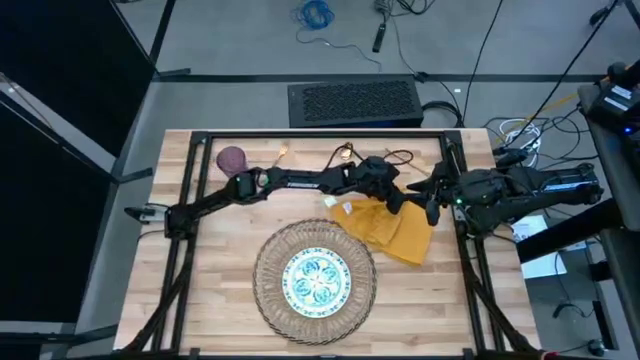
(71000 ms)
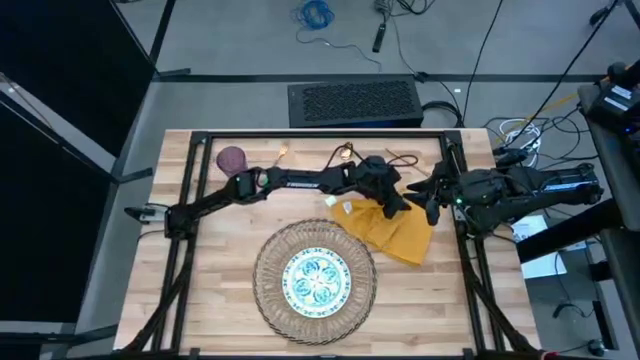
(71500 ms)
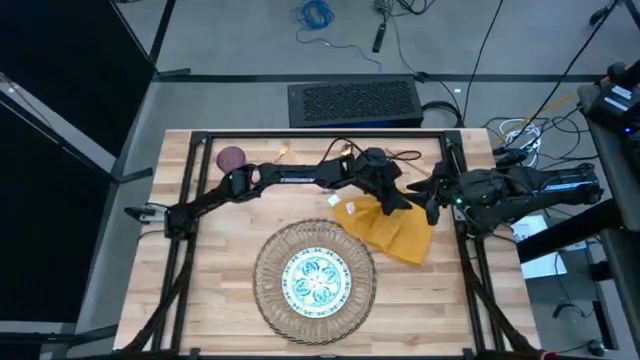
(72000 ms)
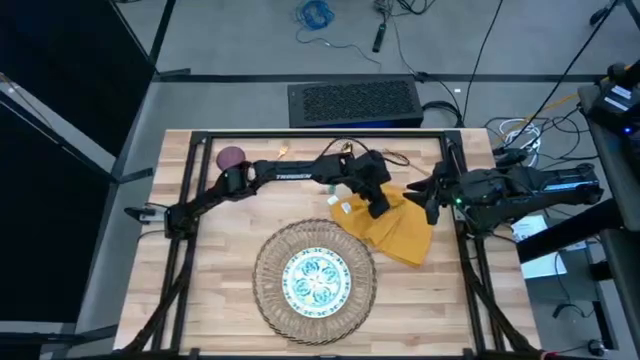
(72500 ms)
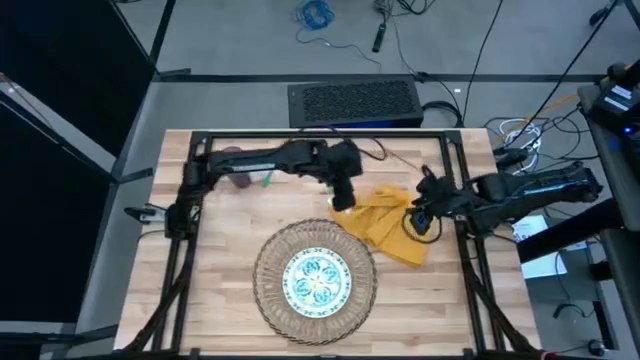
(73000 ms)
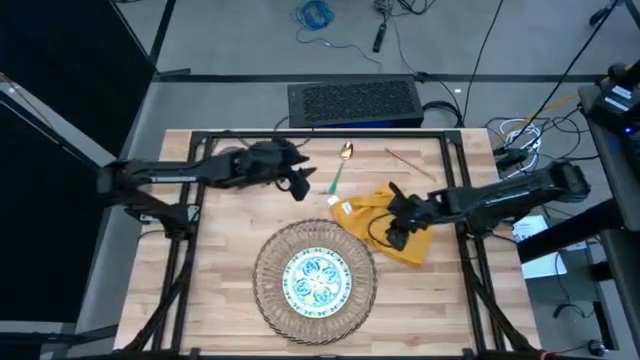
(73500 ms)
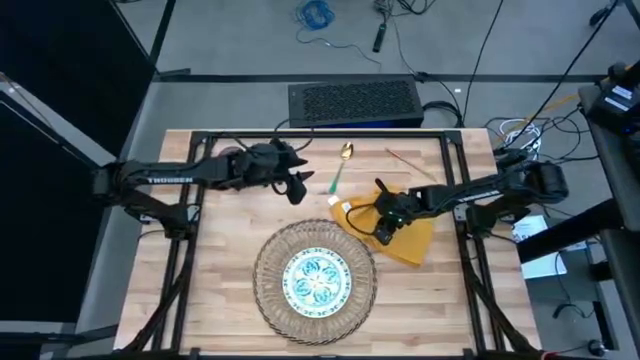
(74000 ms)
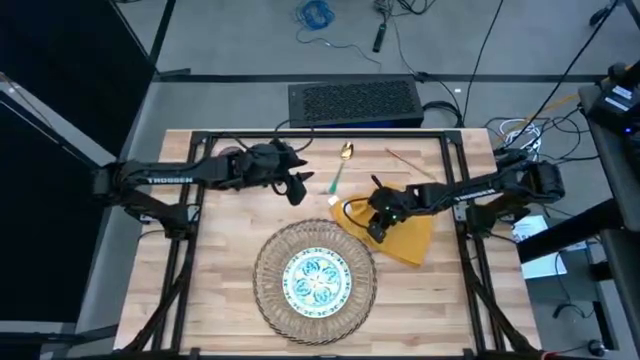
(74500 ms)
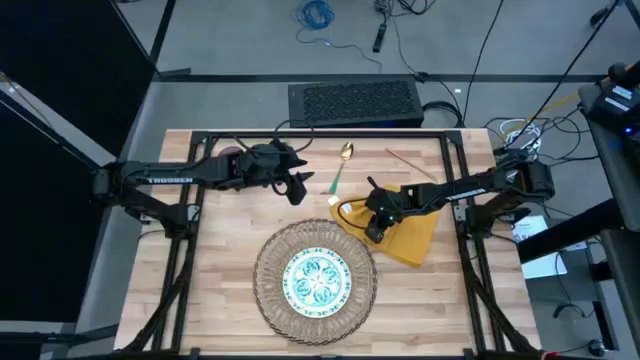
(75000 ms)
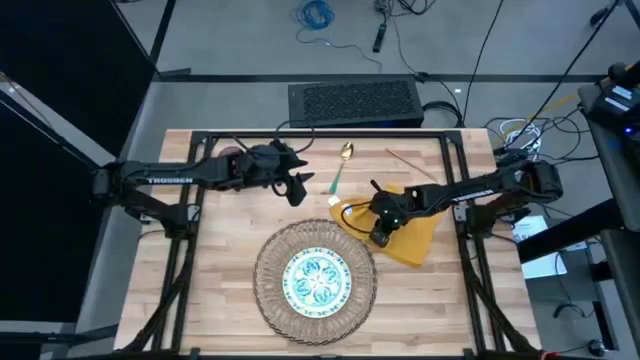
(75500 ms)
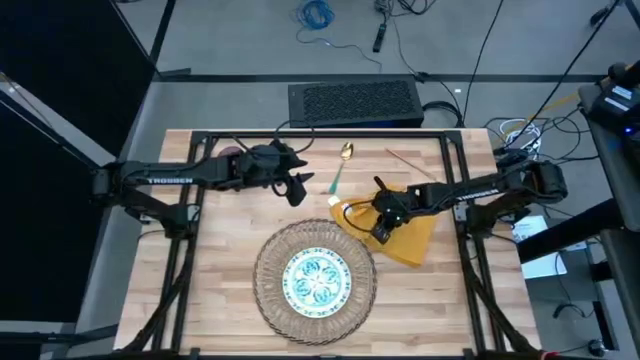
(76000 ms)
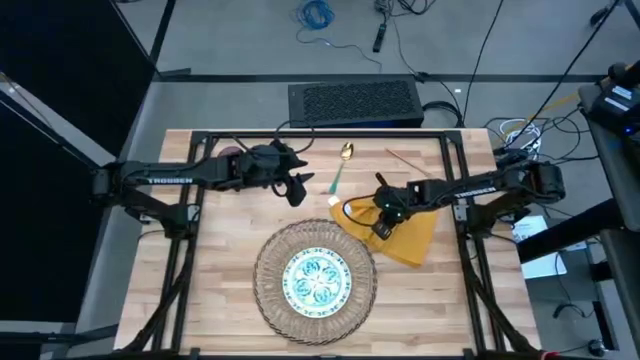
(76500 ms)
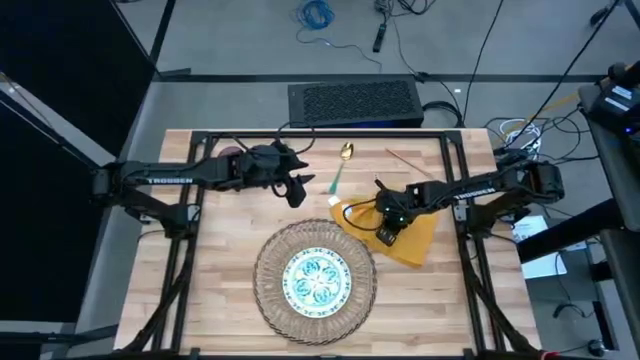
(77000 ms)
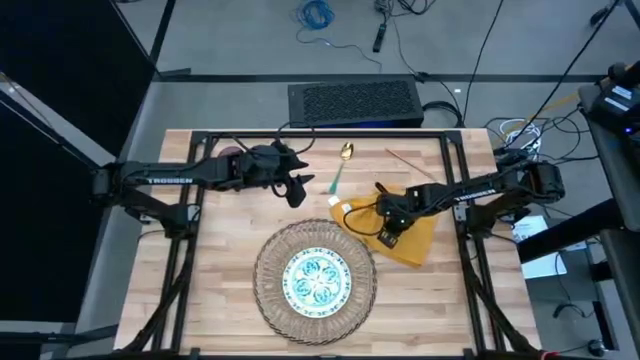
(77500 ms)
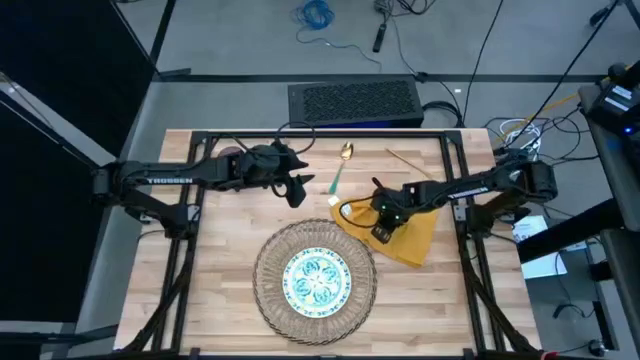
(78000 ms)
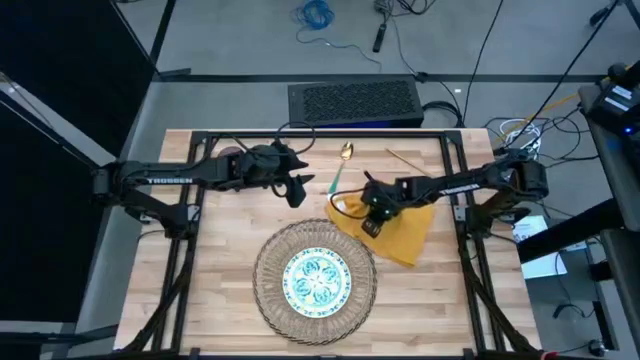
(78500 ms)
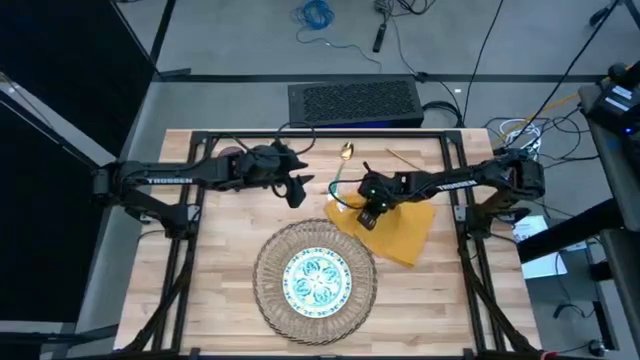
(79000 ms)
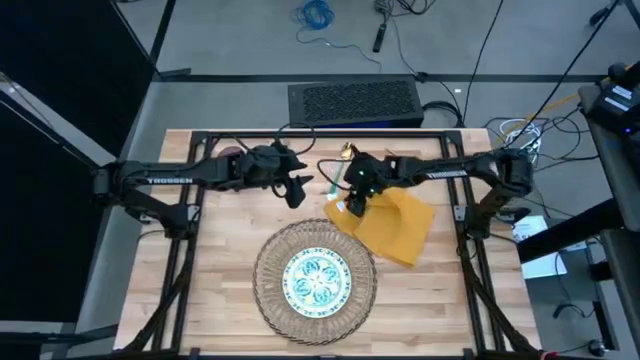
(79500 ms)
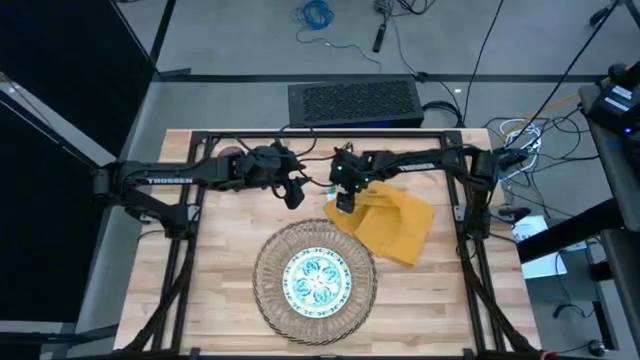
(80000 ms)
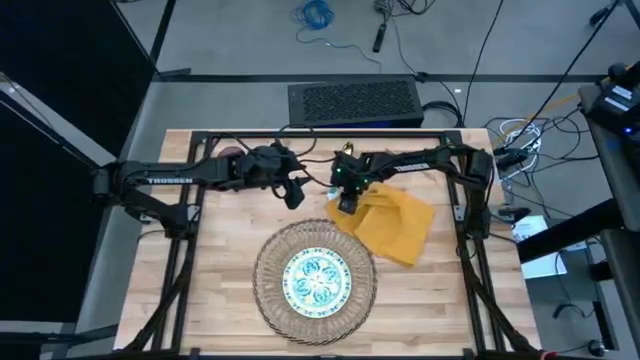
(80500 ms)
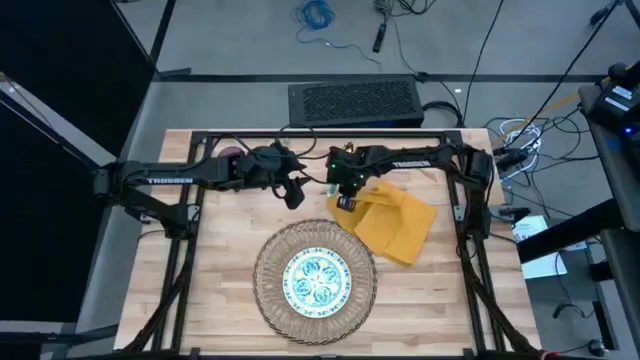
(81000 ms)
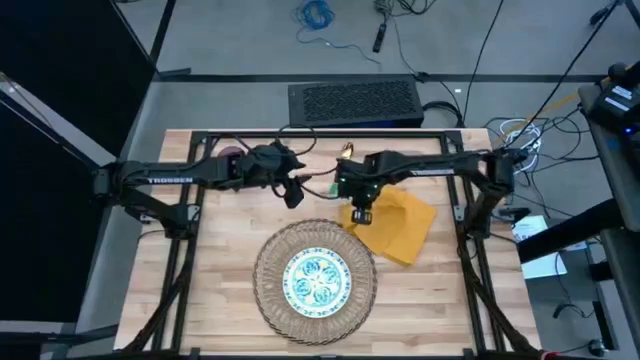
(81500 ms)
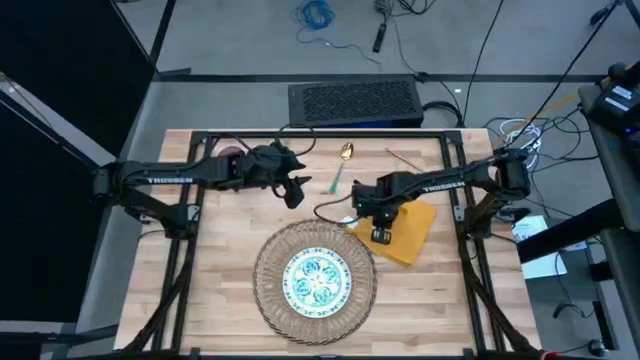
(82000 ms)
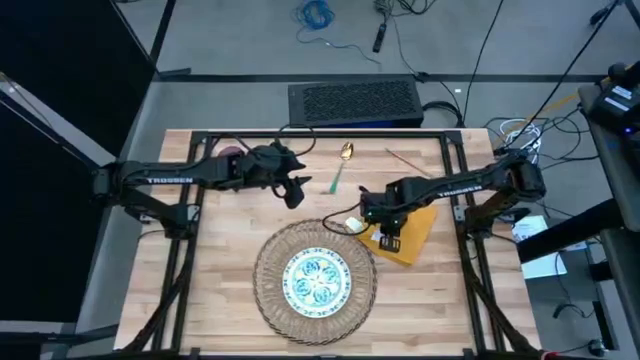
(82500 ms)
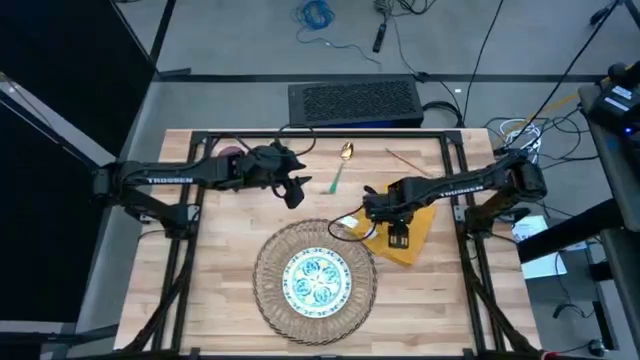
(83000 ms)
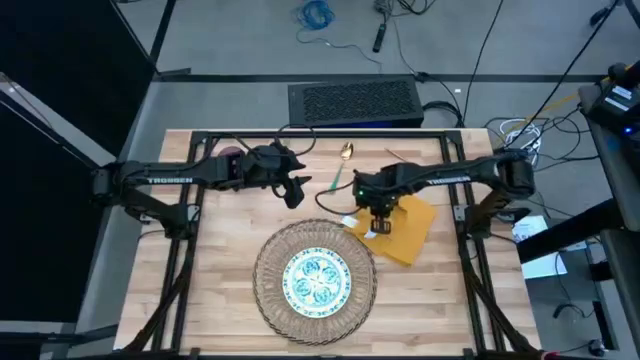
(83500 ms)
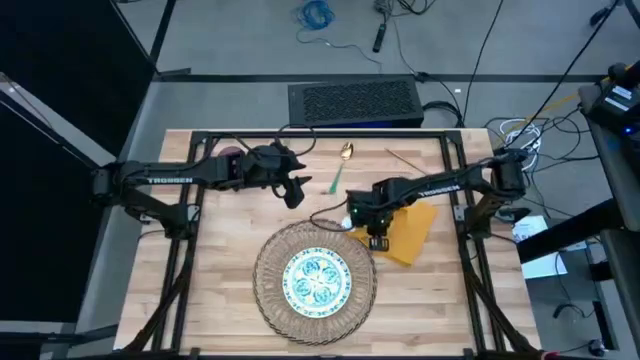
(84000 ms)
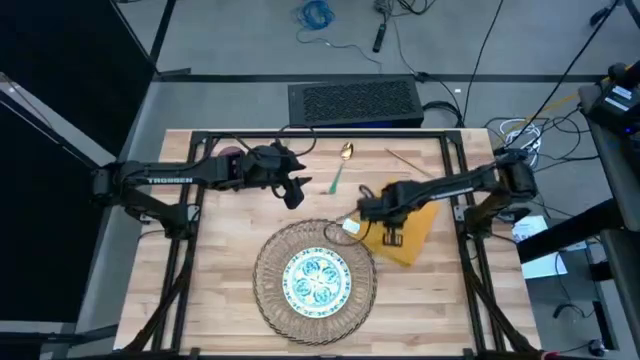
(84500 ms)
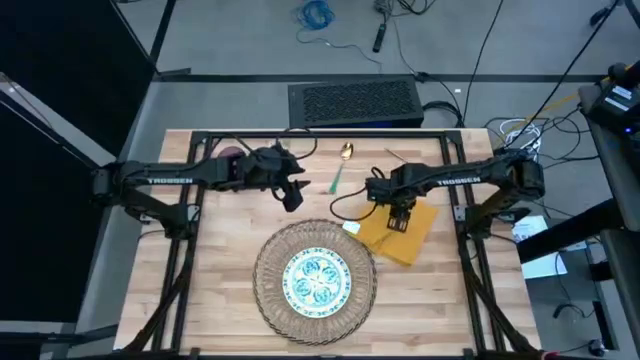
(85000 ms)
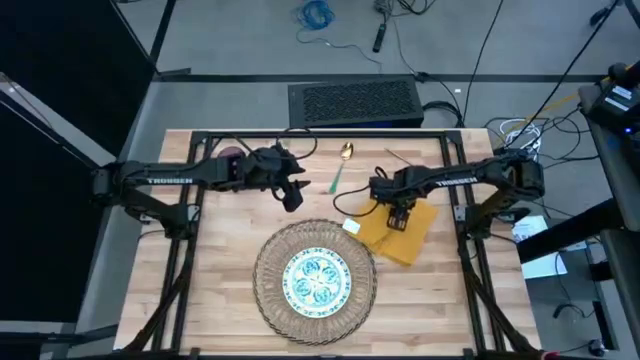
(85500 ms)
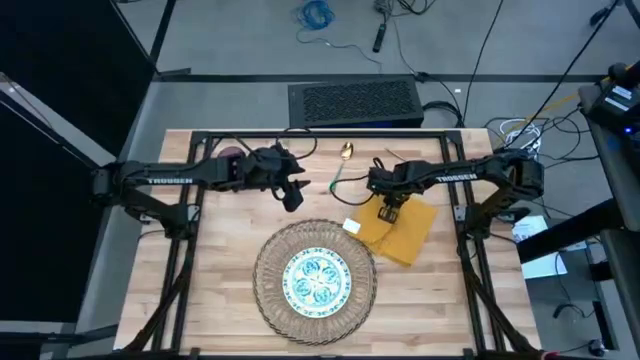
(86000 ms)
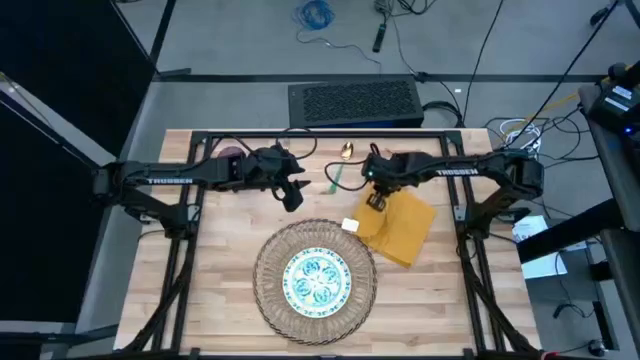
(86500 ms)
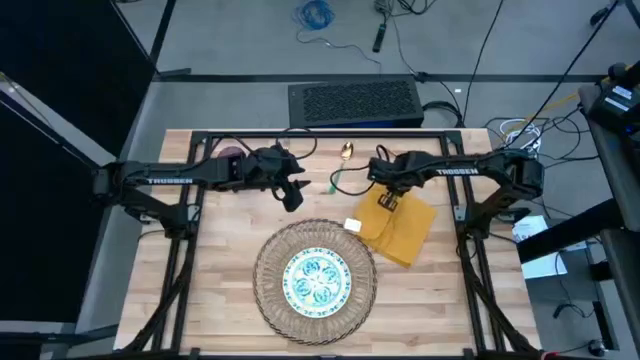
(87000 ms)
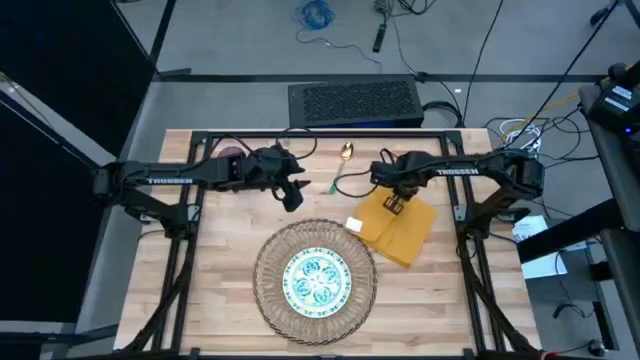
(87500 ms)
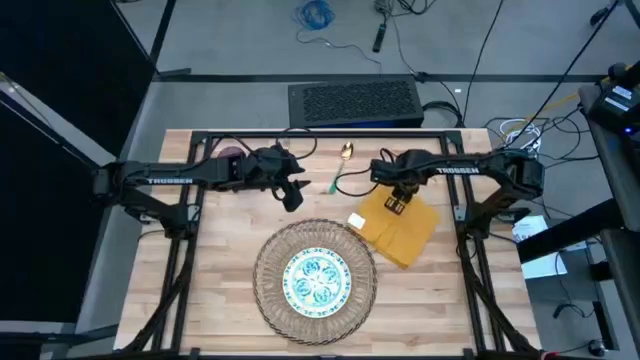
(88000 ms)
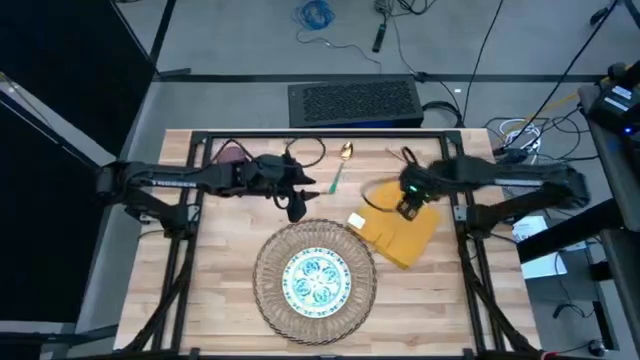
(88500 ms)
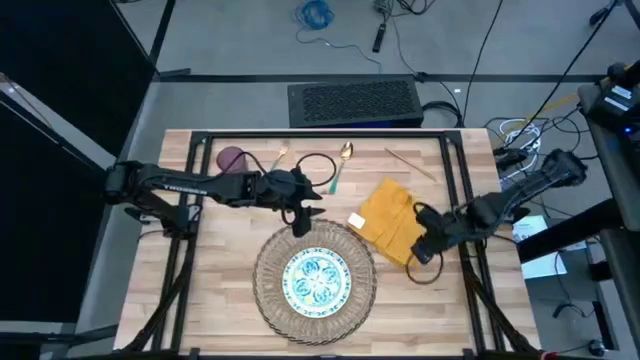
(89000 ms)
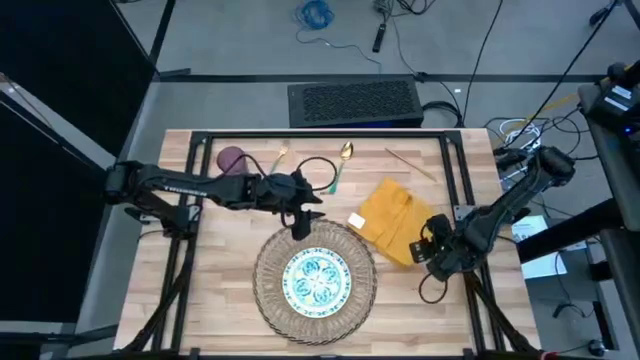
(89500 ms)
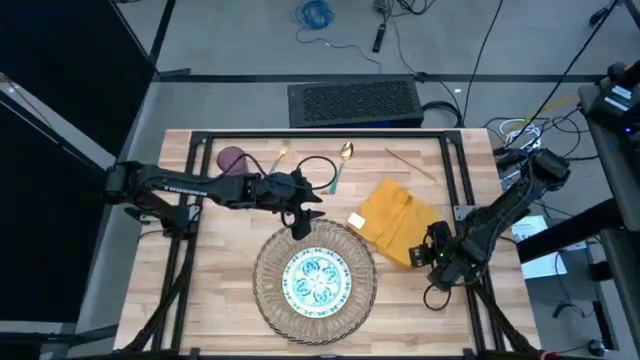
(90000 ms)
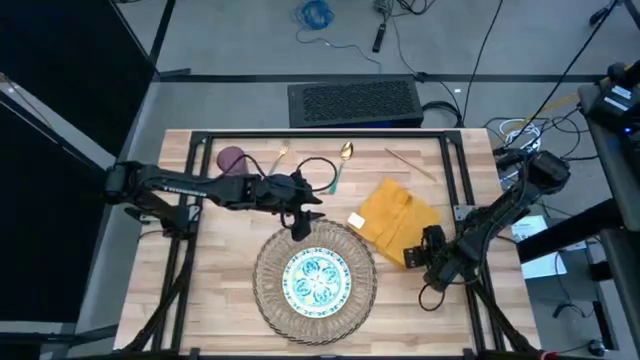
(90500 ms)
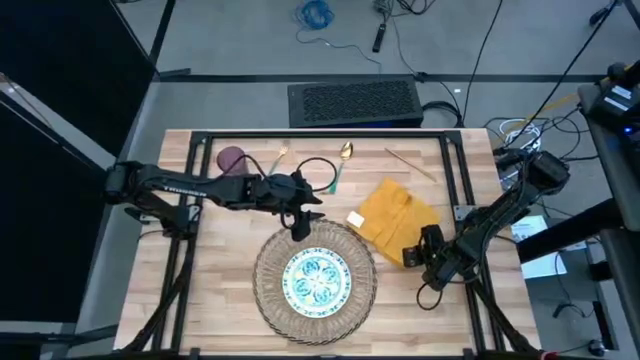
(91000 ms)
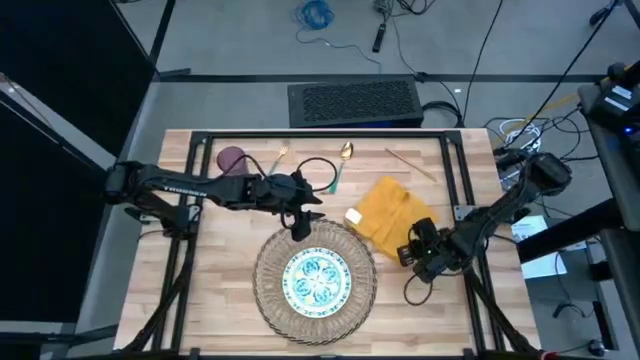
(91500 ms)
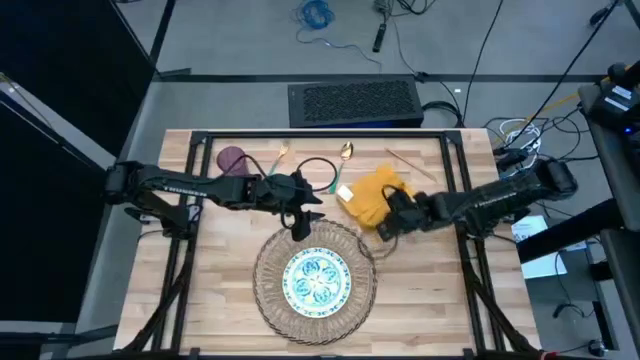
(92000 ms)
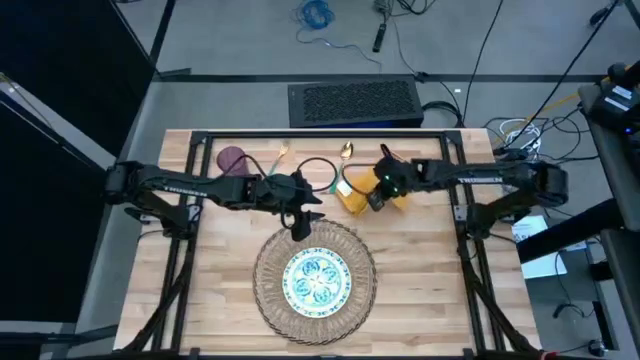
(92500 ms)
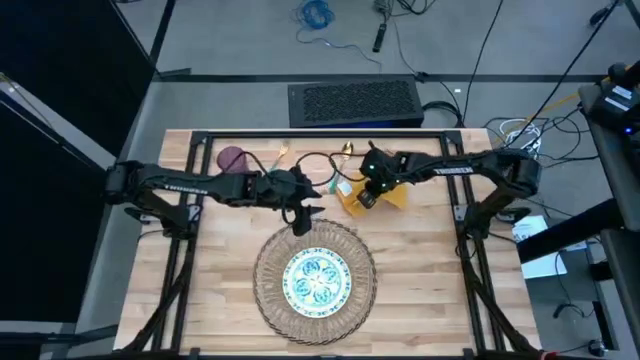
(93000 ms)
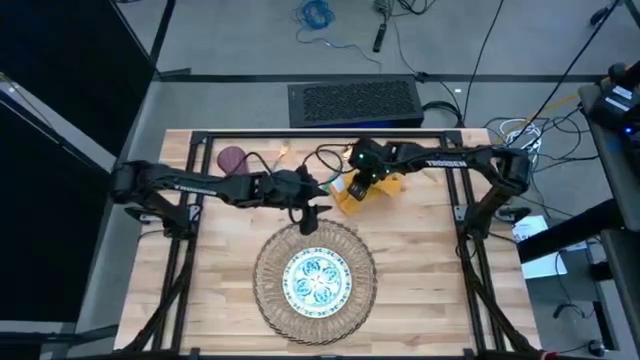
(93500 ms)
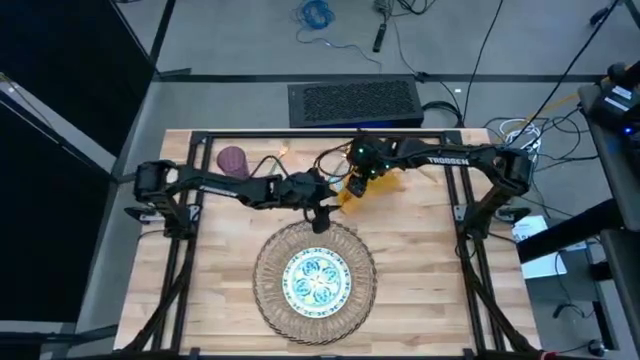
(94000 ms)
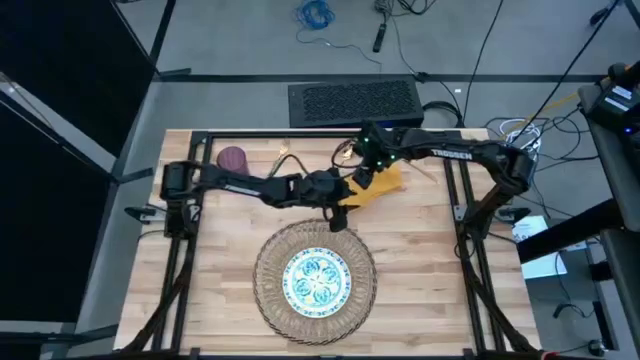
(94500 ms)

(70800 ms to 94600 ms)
Task: Set table place
Fold the yellow table napkin
